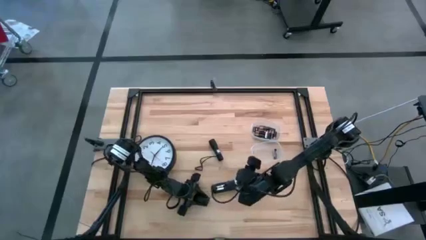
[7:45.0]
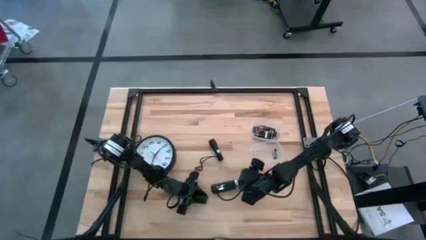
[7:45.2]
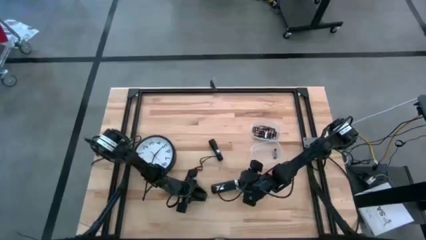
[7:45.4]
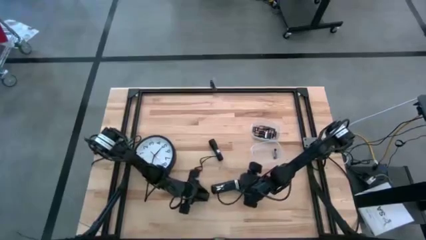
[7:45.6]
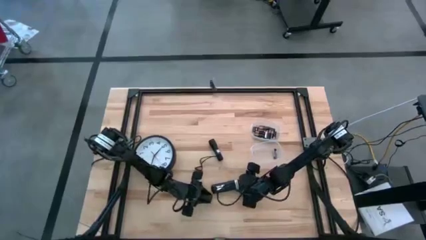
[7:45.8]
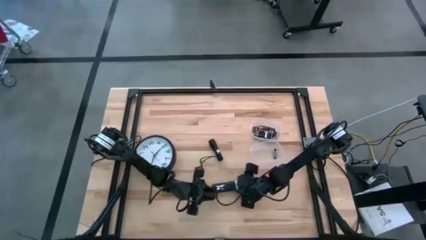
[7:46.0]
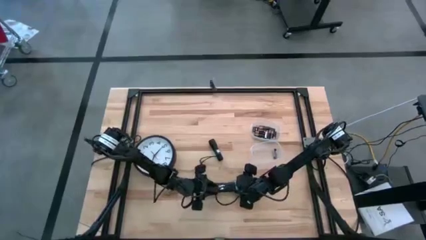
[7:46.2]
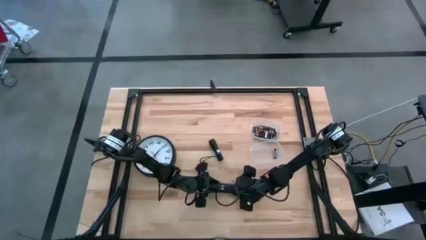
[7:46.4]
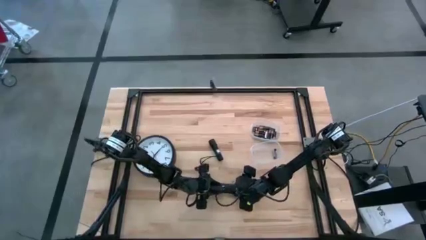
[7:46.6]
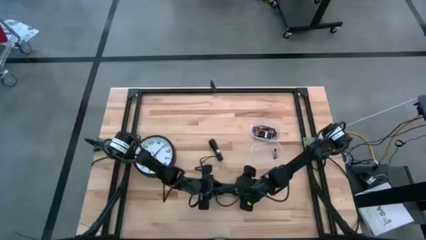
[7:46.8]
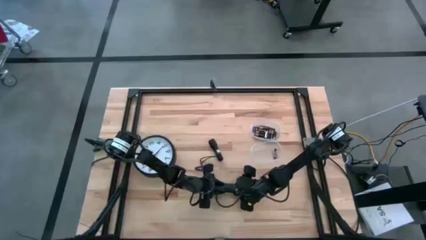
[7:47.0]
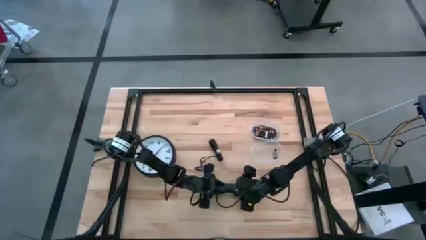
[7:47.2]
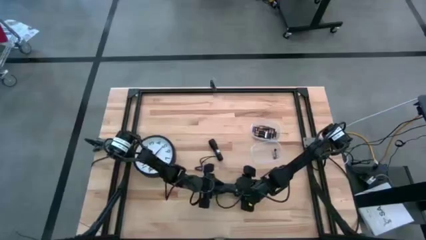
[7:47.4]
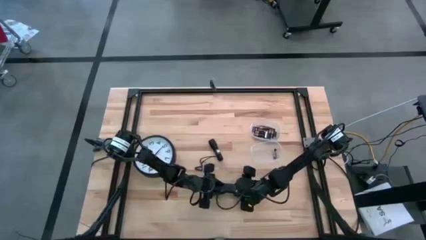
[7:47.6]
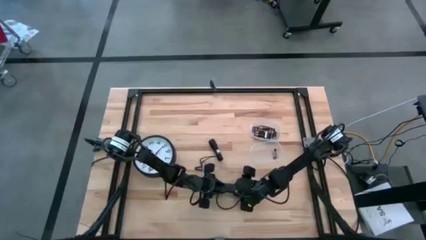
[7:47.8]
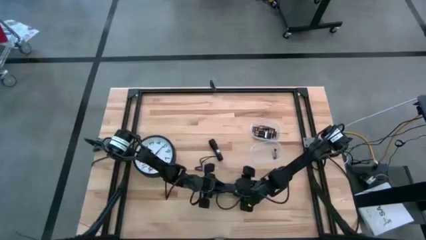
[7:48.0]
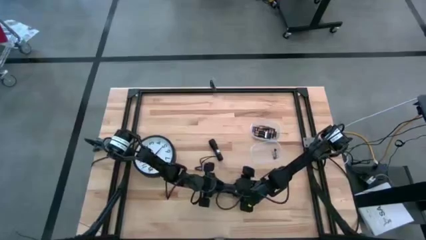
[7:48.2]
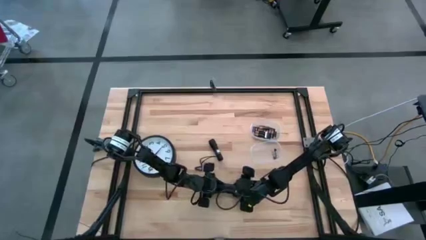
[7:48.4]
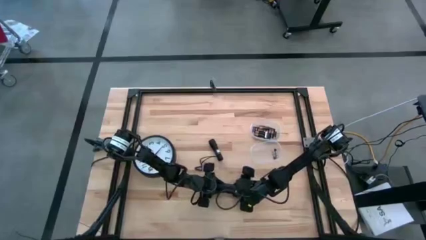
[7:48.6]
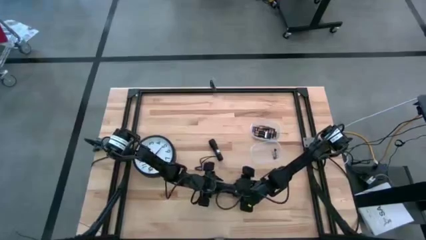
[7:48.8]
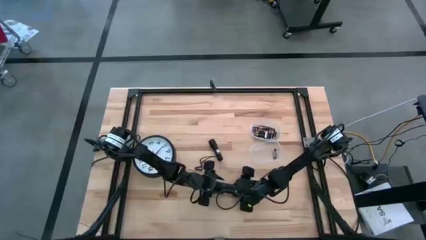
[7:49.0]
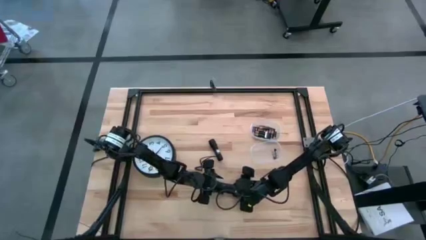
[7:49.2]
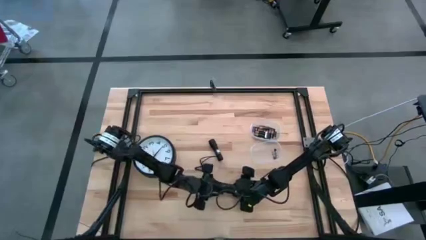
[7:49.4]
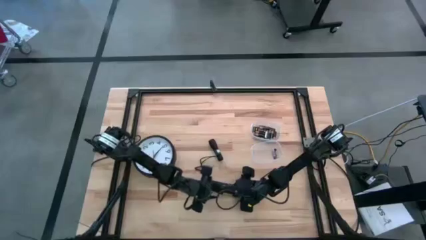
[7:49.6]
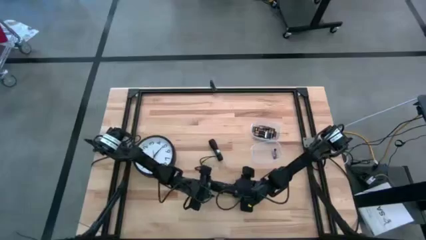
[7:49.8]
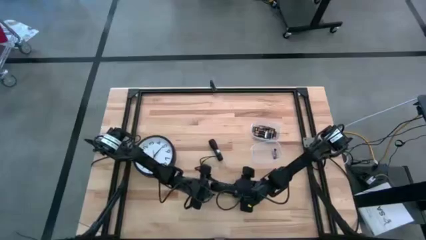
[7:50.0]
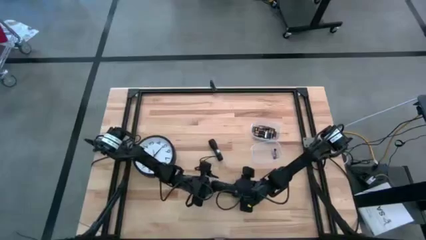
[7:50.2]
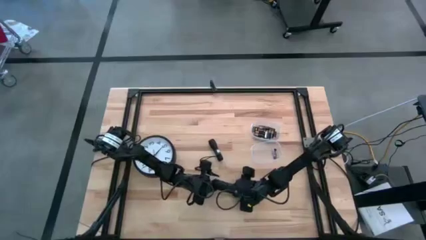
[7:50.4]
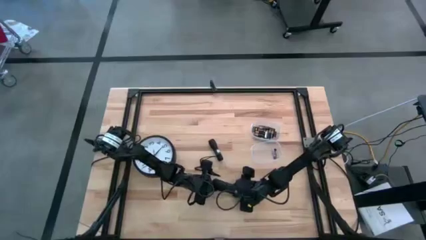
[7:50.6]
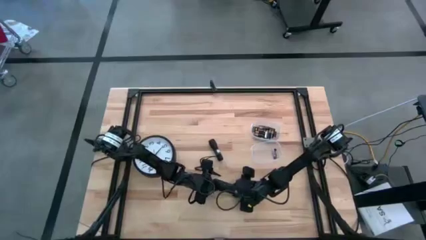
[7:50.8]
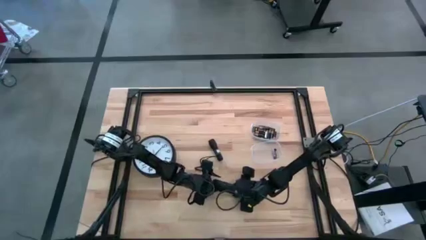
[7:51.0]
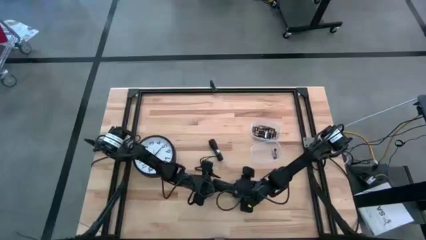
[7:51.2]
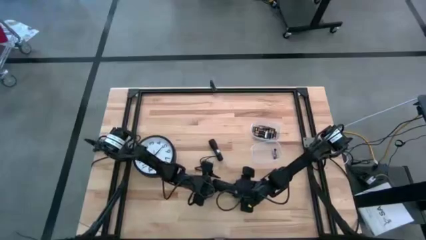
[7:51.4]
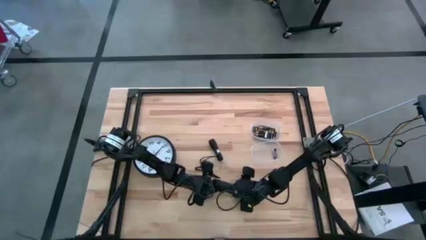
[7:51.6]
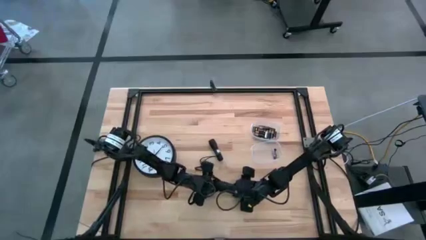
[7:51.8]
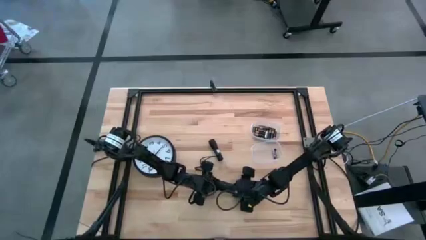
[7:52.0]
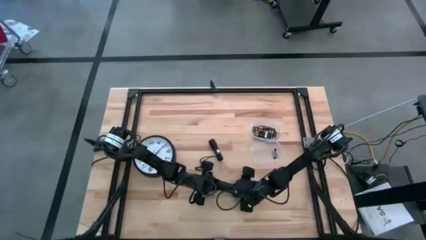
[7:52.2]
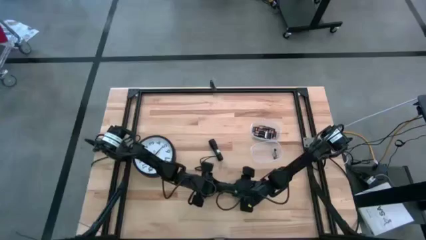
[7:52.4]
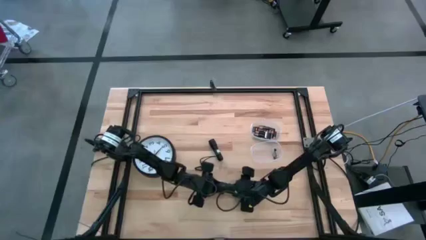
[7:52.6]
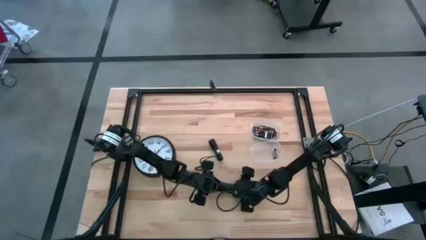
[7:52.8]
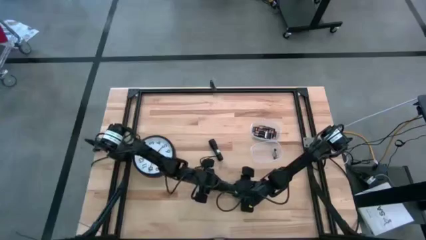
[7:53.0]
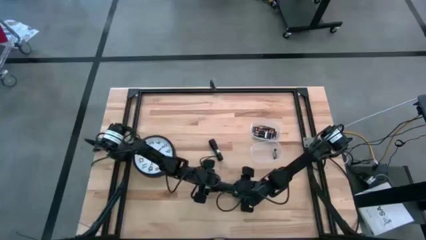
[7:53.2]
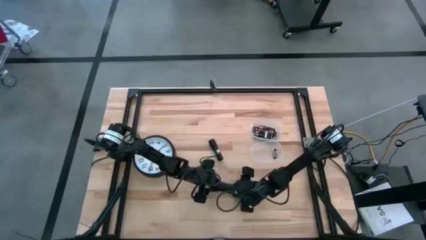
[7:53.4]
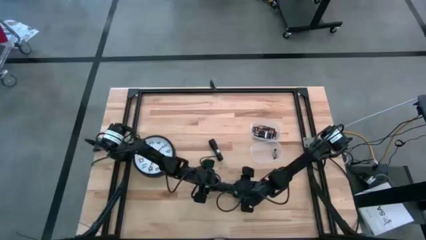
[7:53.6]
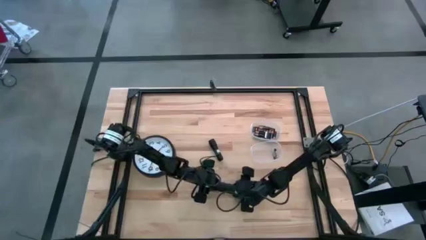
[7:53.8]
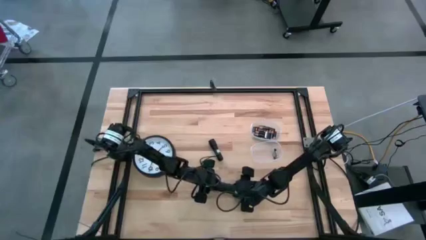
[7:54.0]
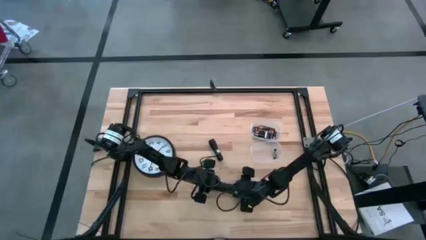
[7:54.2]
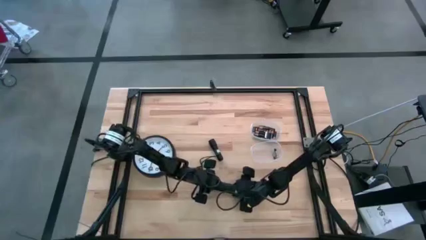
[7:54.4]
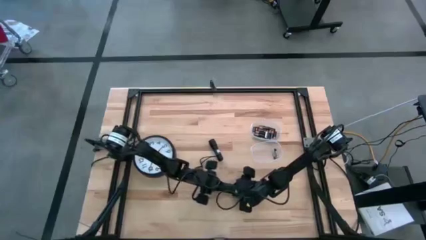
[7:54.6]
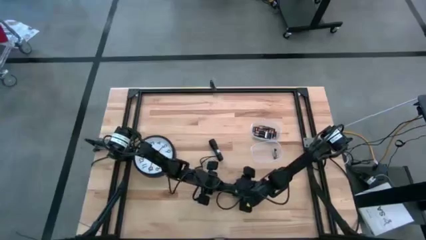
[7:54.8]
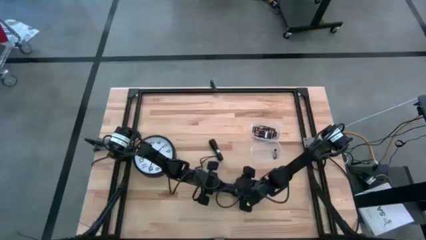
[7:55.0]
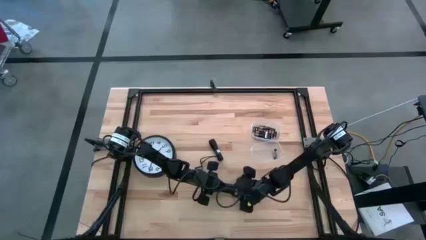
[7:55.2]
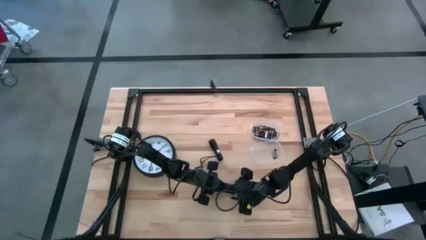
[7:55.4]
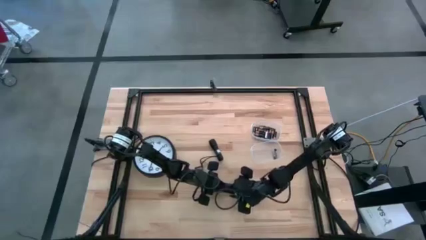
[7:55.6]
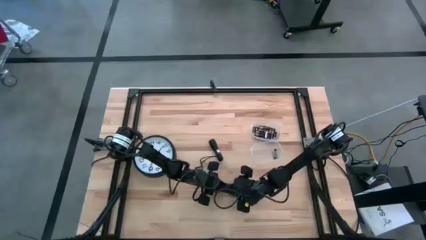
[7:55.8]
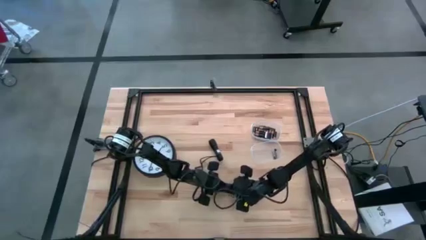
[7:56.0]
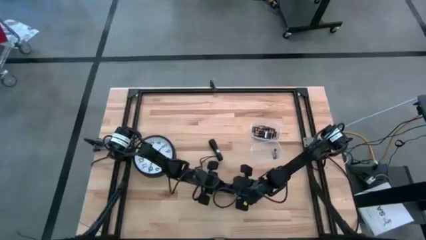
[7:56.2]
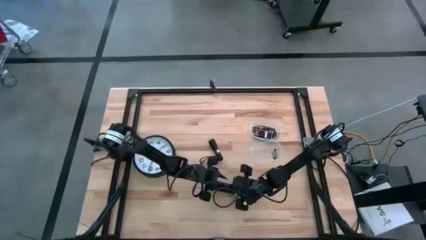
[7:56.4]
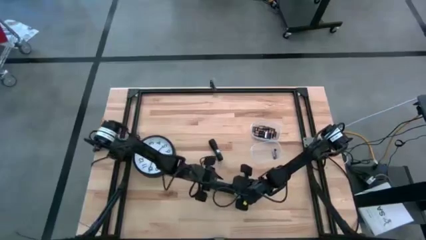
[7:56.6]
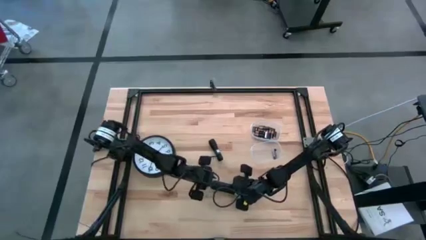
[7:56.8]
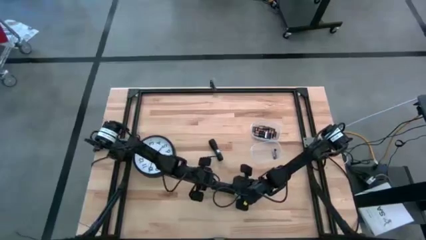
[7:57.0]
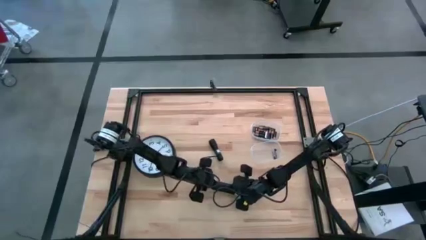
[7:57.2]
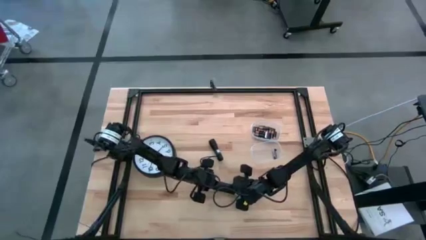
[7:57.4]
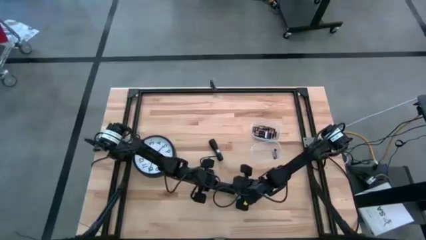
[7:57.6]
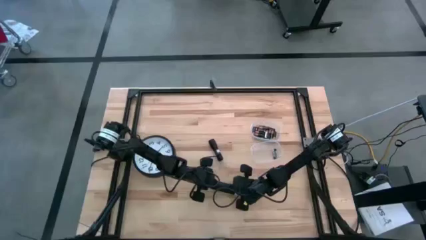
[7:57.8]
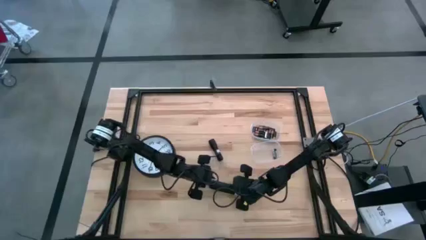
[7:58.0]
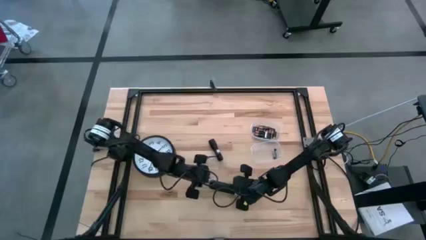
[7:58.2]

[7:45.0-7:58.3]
Task: Insert battery
Close the remote’s battery compartment cover

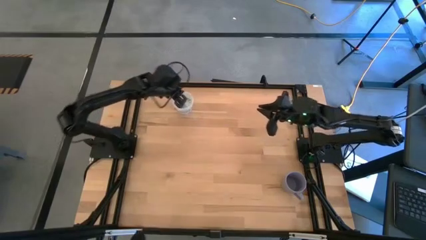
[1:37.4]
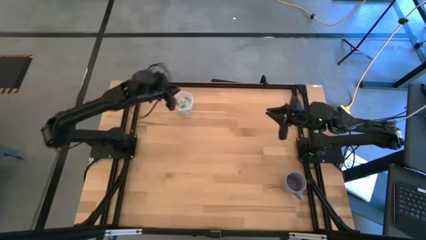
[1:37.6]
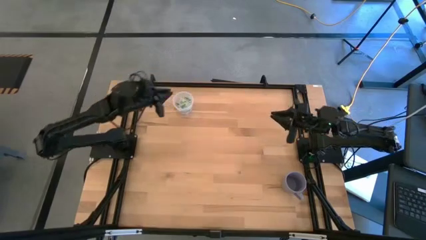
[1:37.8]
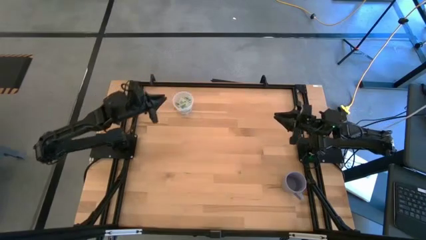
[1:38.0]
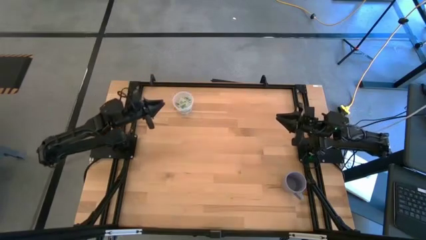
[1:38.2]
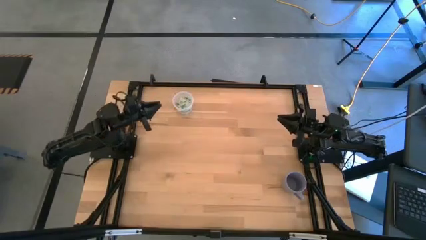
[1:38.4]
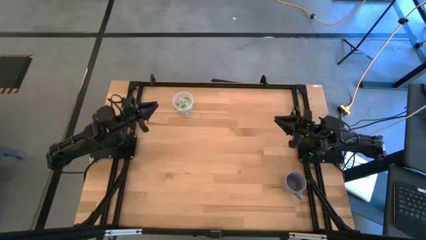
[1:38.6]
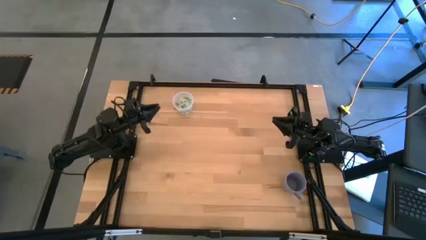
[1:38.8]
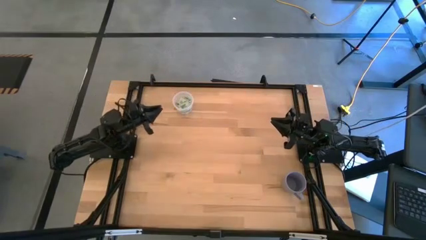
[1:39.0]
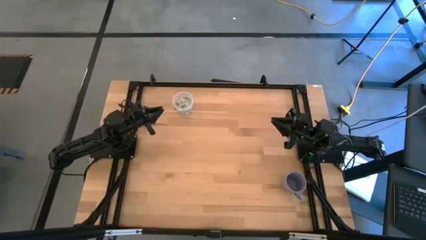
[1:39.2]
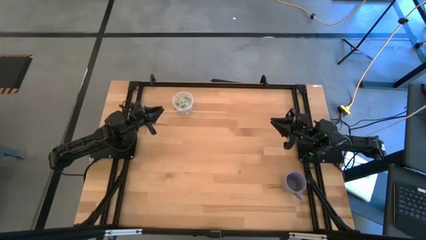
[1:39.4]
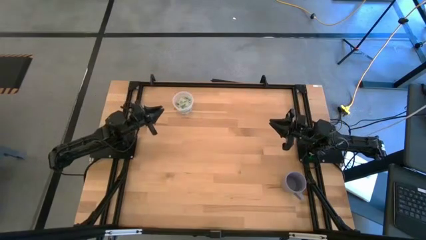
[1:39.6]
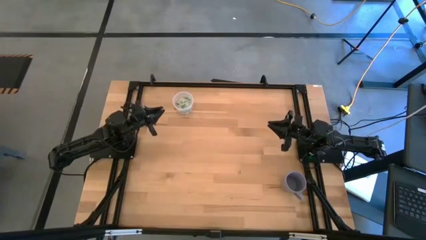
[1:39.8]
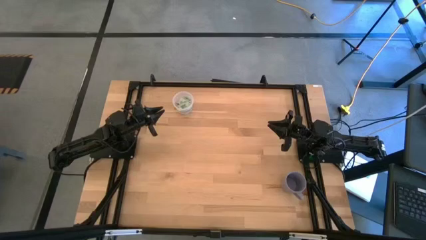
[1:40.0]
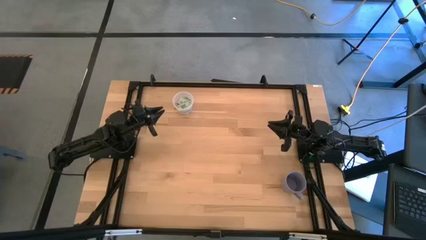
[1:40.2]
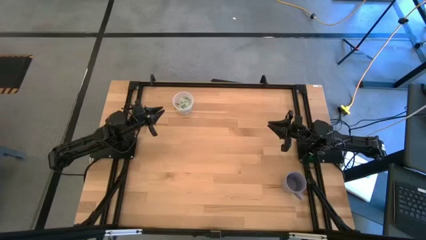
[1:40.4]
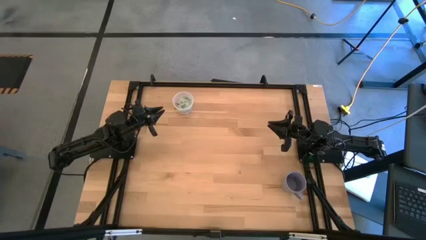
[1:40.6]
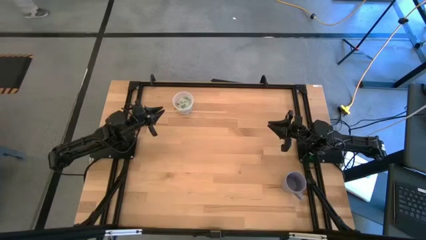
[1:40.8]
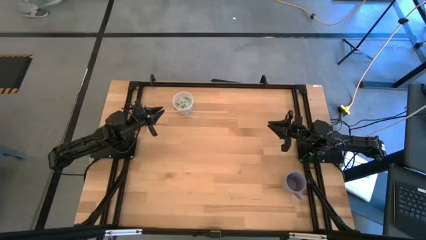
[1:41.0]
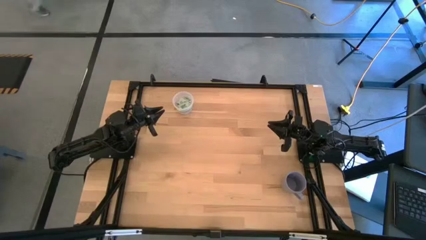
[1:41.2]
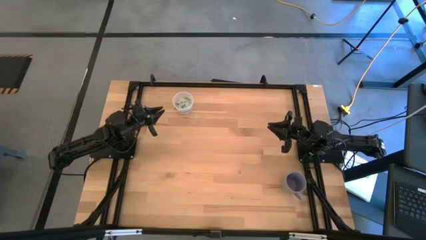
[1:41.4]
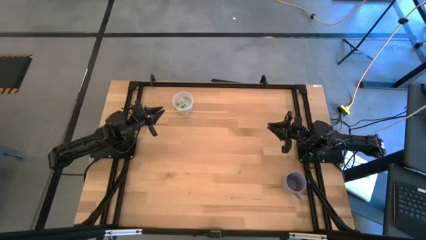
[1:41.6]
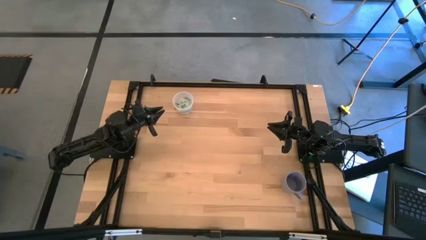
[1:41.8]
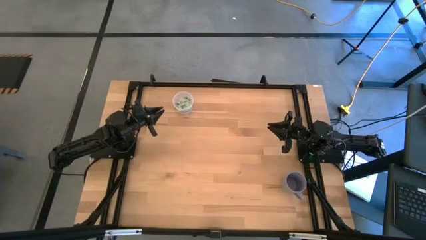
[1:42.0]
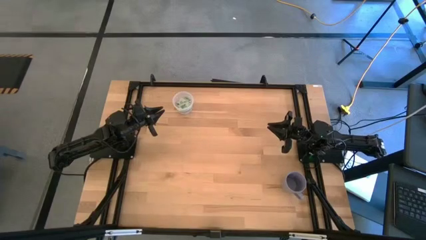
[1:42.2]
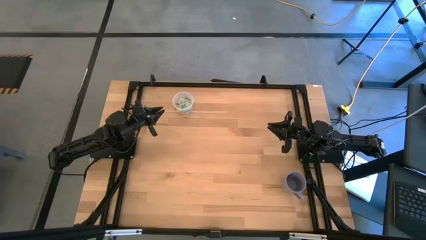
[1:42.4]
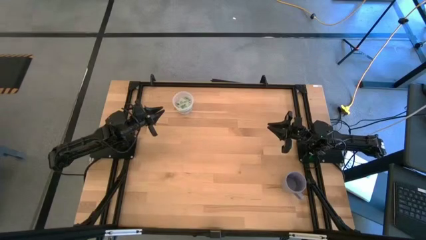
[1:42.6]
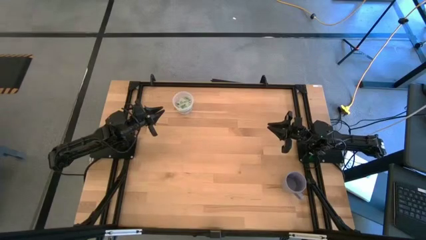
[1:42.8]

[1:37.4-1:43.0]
Task: Pick and place items into bin
Return to Home Position
